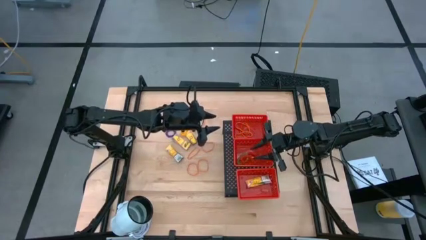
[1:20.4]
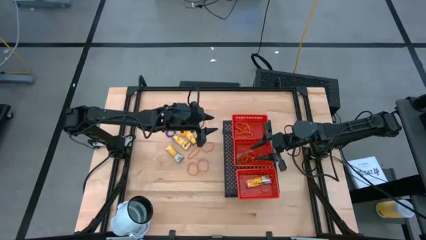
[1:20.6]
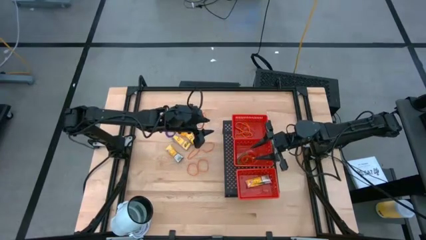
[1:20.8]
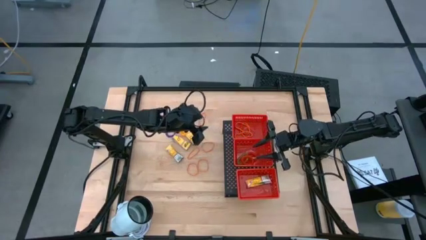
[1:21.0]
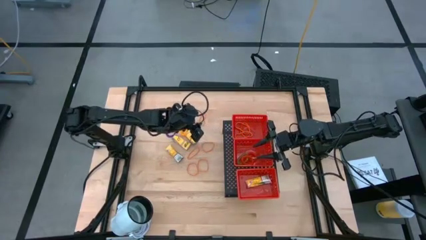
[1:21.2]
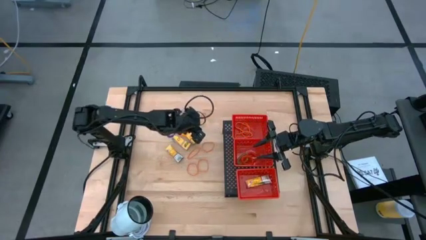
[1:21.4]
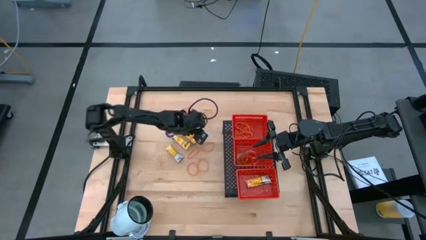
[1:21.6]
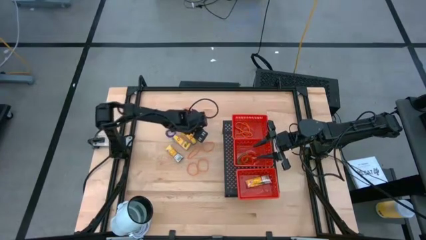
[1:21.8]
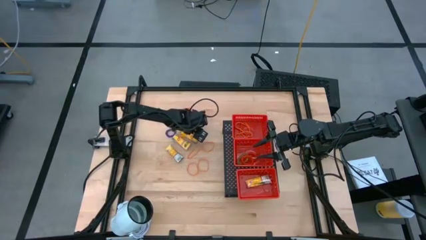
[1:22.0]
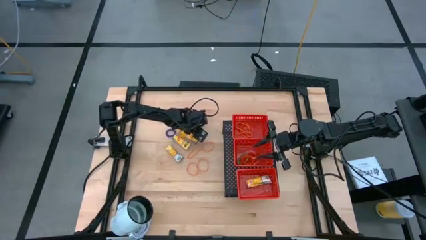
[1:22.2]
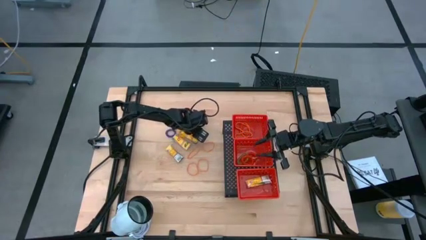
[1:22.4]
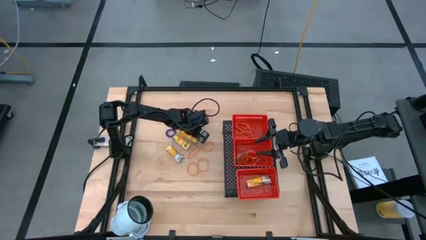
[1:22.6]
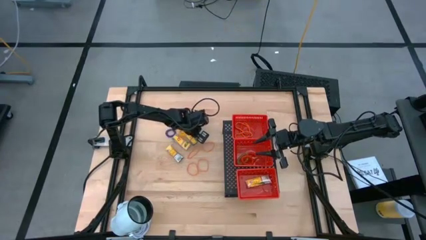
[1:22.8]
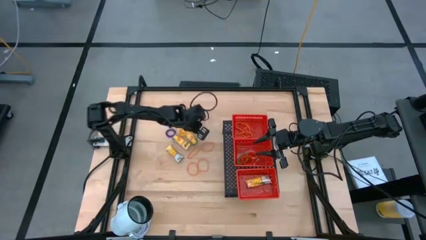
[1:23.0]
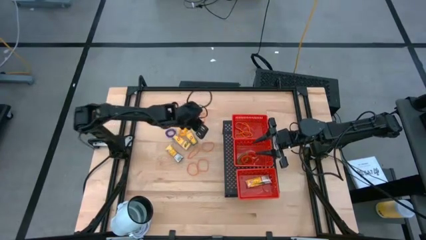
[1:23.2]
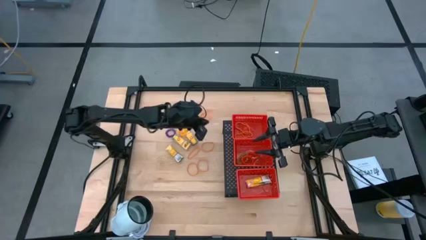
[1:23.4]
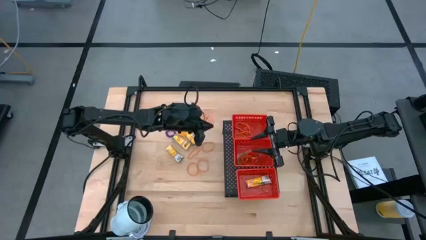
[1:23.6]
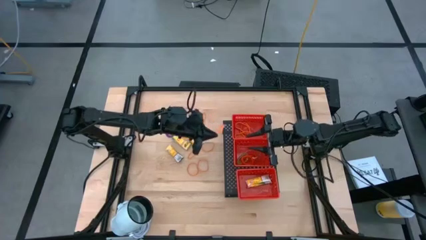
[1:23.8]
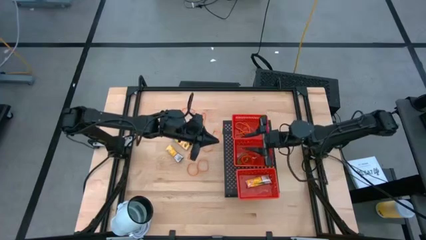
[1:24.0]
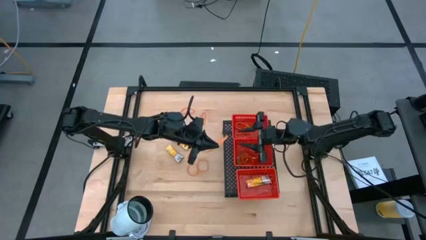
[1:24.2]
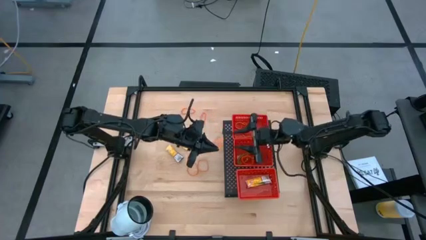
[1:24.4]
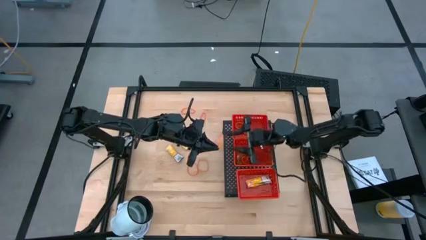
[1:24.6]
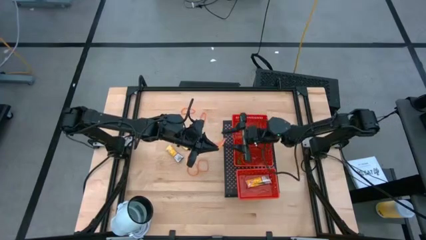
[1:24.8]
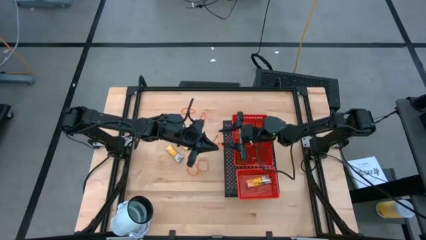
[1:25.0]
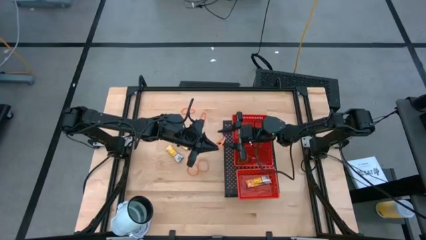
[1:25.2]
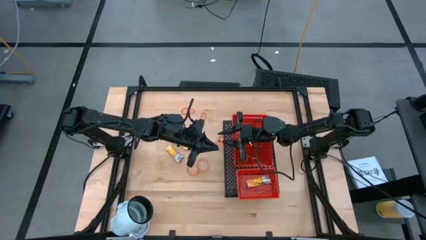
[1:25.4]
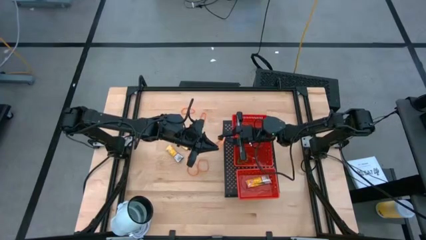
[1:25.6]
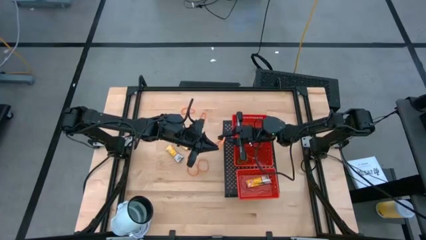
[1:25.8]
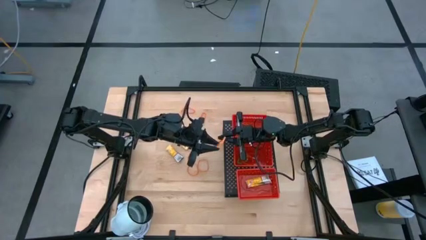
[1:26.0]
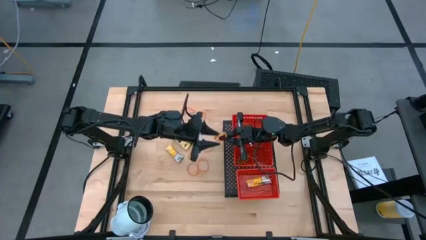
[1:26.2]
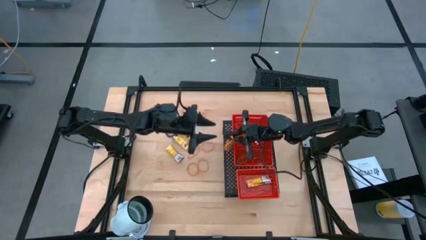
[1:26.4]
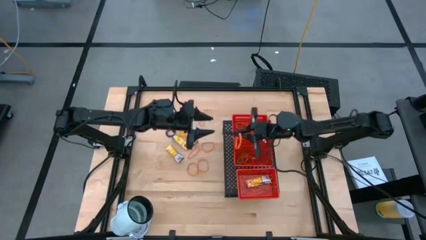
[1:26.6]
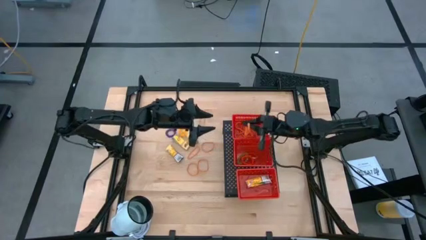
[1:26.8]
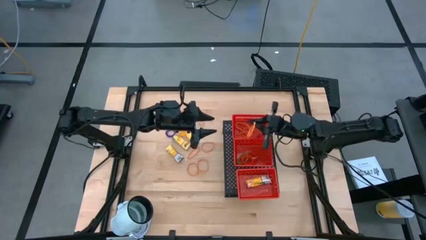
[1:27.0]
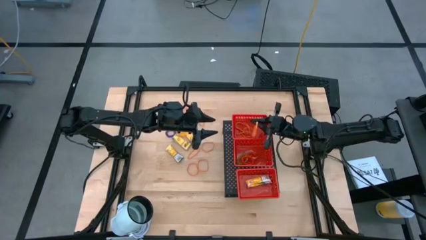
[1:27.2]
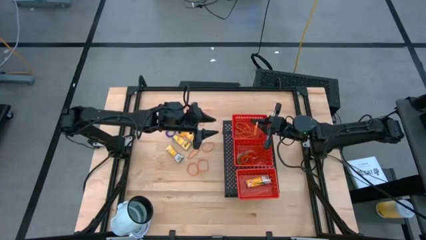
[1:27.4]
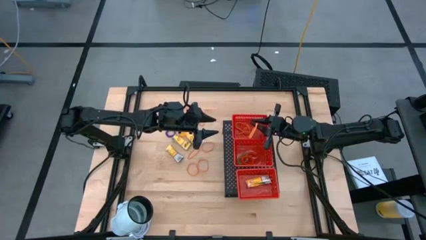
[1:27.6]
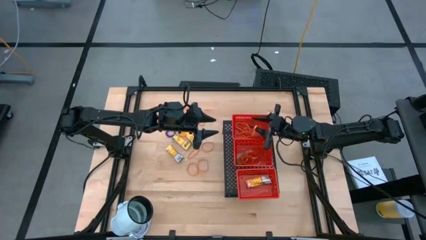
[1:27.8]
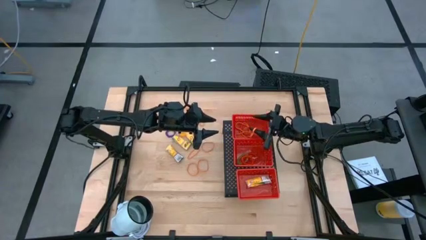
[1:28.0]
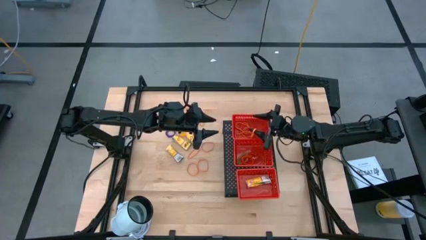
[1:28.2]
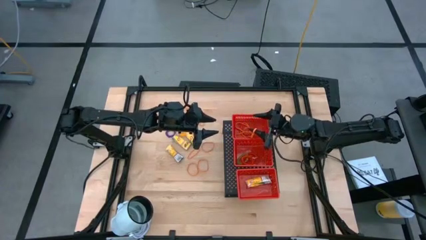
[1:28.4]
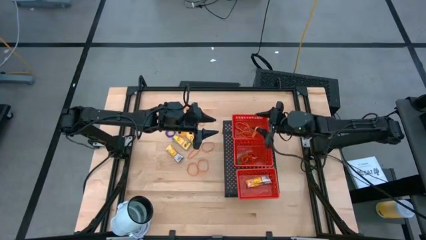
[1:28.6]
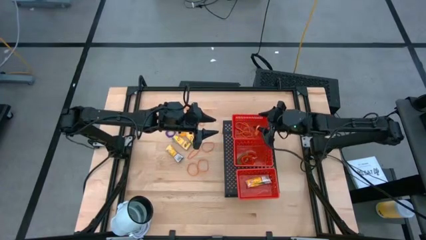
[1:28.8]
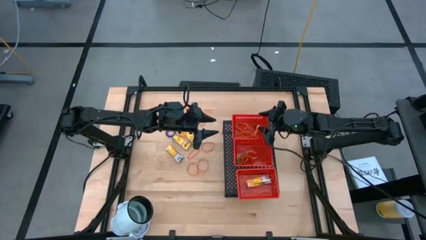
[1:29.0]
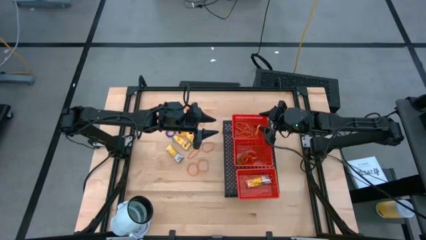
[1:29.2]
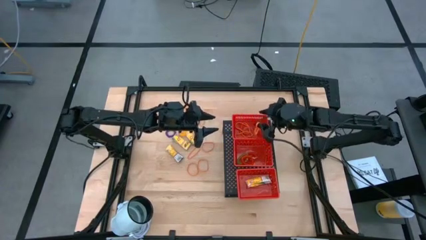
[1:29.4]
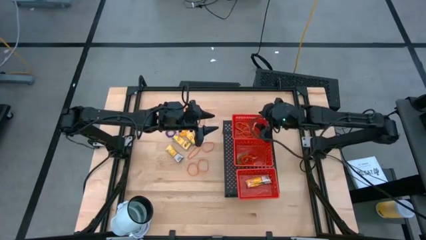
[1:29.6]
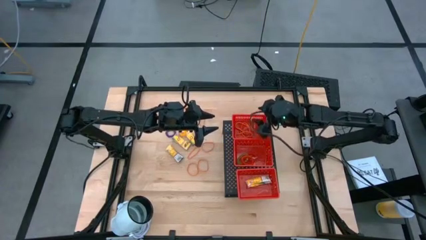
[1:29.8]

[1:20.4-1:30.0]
Task: Pick & Place Office Desk Supplies
Put the orange rubber band into the top red bin on the shelf

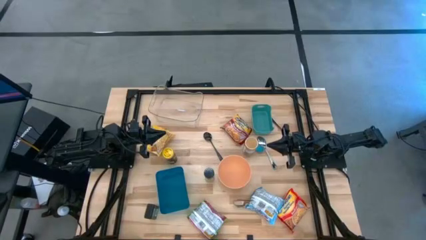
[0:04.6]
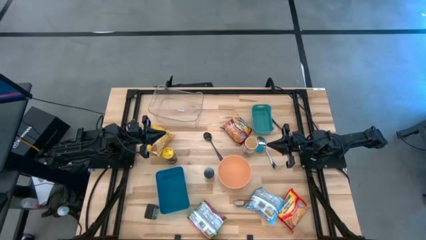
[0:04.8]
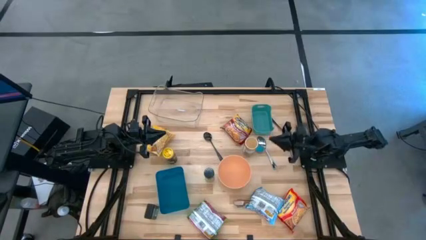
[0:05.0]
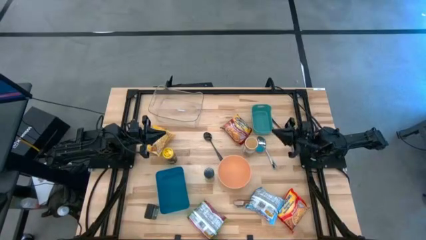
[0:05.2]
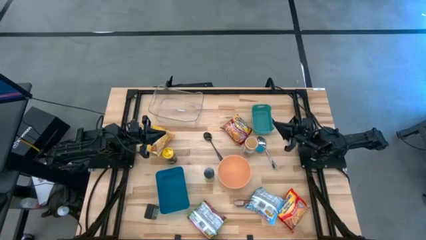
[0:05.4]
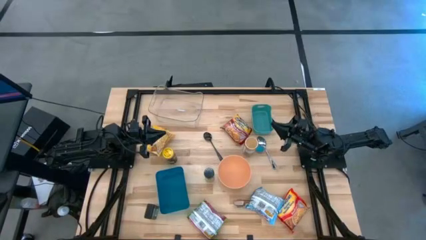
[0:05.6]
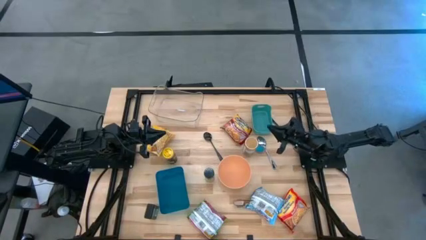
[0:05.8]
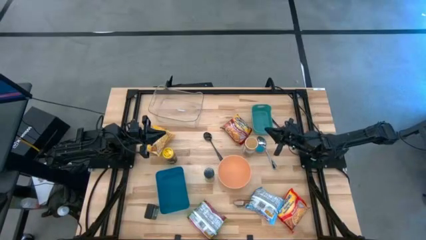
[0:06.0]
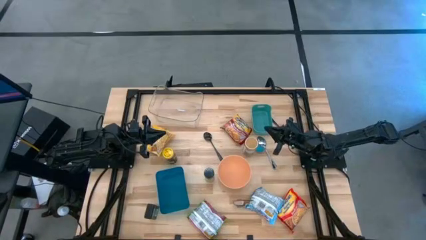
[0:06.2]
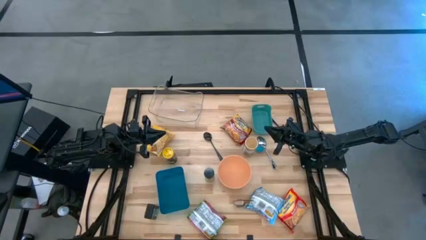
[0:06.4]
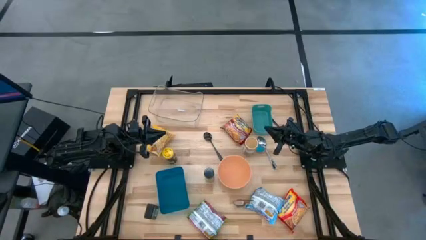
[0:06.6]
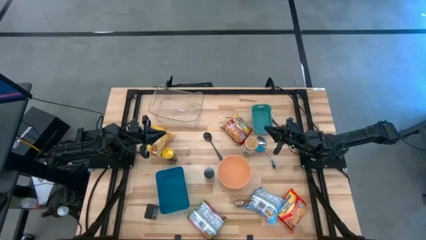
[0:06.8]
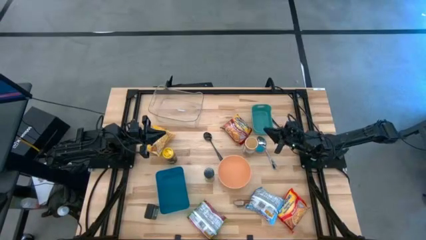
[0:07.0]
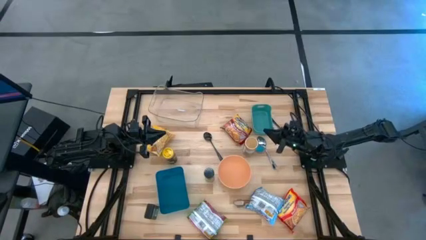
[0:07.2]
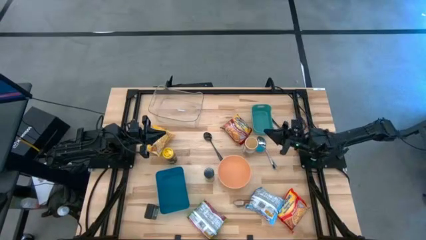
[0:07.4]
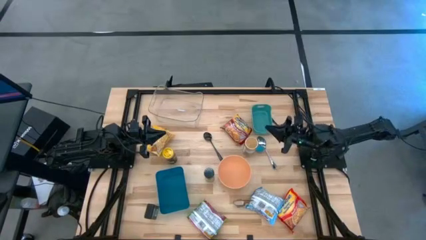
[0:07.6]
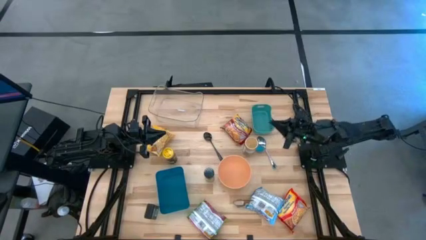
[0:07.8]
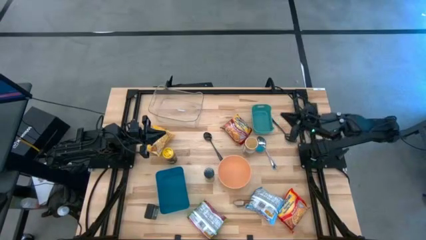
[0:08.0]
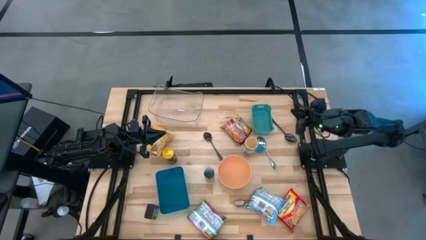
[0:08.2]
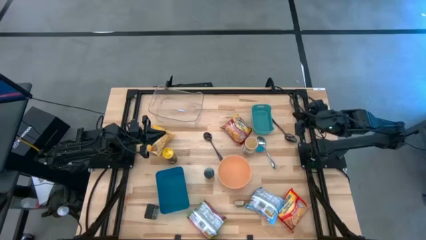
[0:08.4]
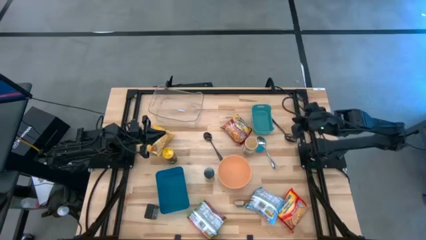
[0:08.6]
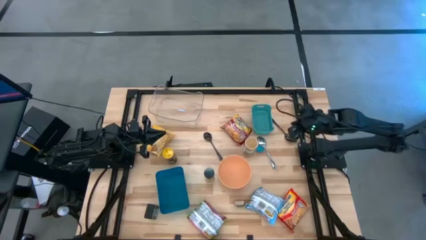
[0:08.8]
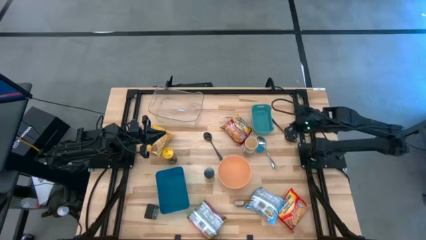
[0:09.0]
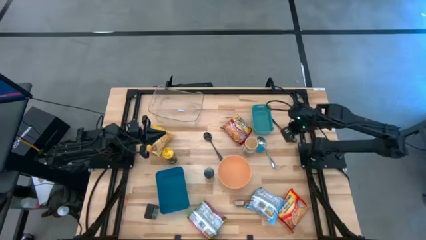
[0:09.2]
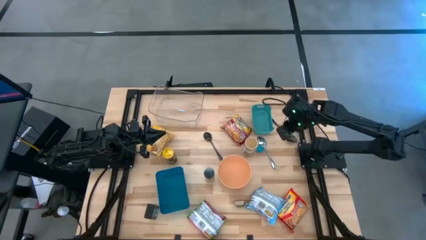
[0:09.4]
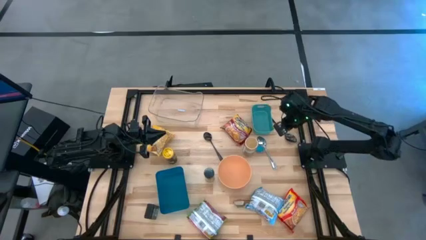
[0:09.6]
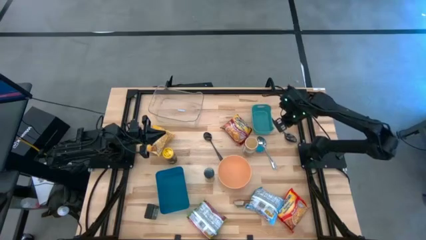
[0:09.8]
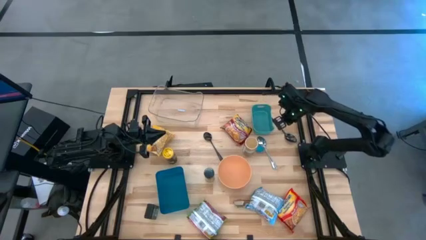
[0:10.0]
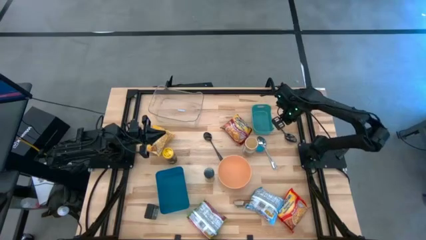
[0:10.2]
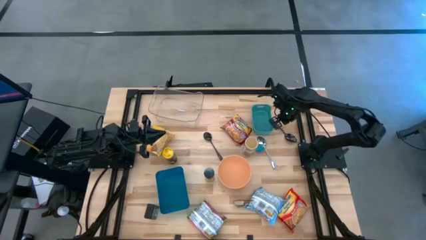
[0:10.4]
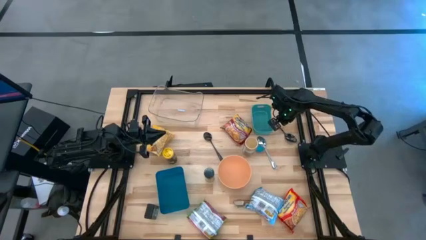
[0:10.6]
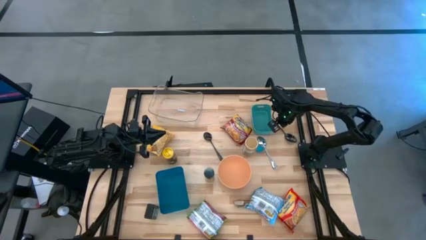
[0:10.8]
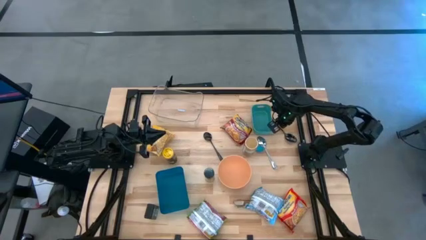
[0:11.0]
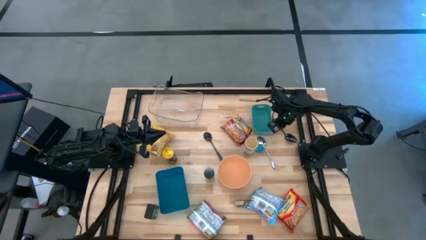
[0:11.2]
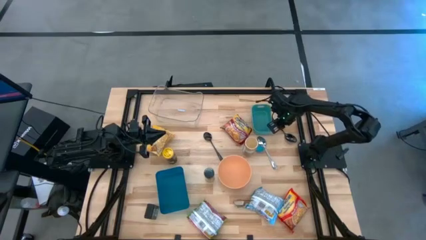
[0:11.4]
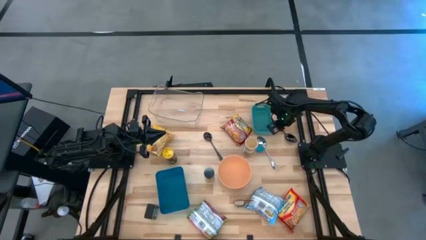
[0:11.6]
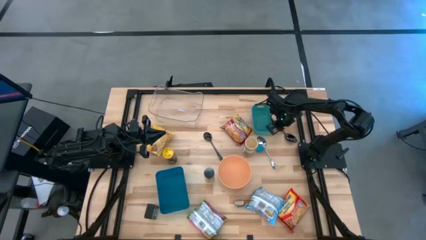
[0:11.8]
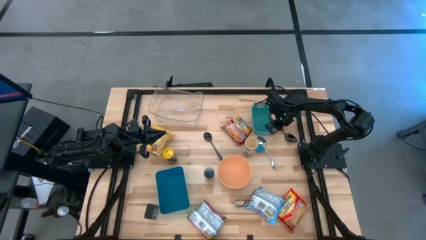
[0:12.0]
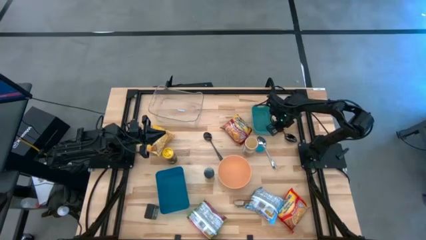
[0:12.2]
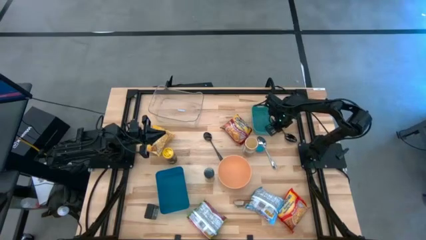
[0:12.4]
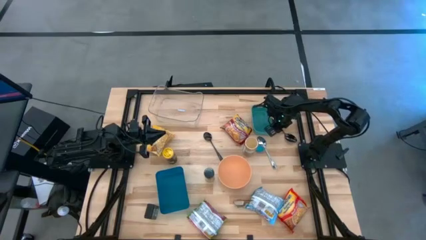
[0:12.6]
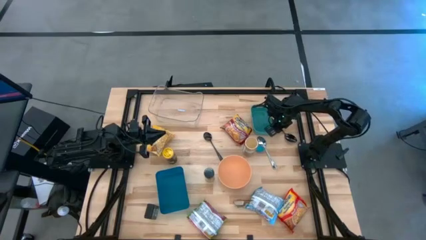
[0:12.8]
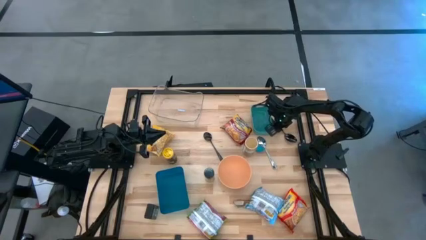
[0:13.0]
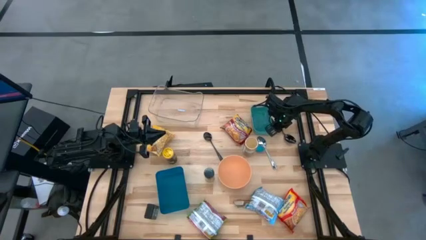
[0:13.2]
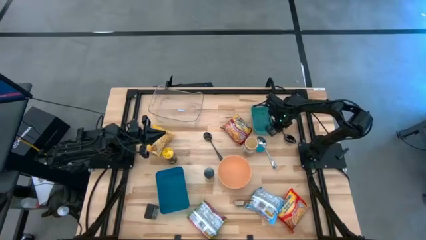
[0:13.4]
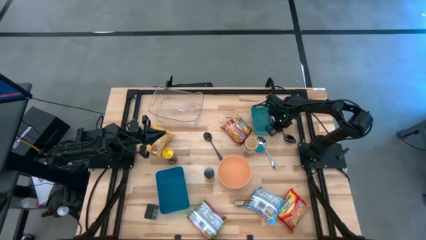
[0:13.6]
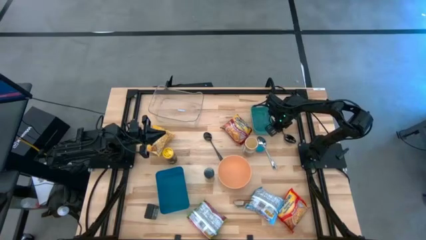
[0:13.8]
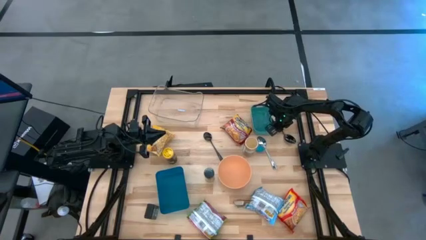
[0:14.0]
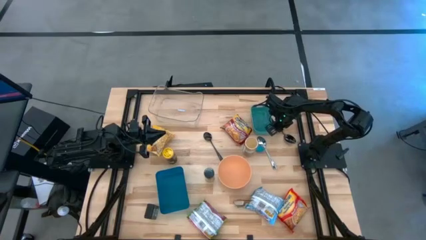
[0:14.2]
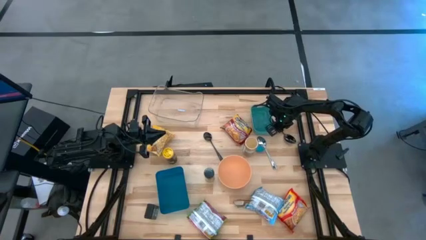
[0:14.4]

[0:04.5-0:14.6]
Task: Pick & Place Food Item
Put the right black spoon into the green bin
